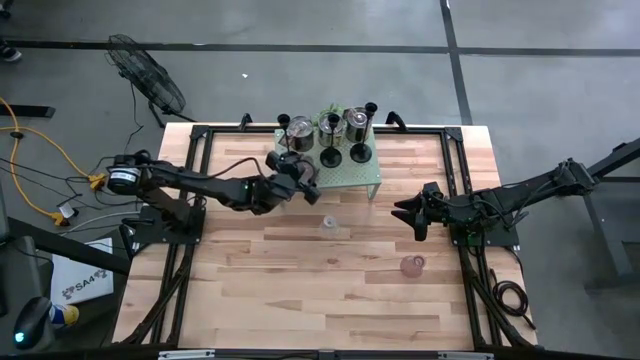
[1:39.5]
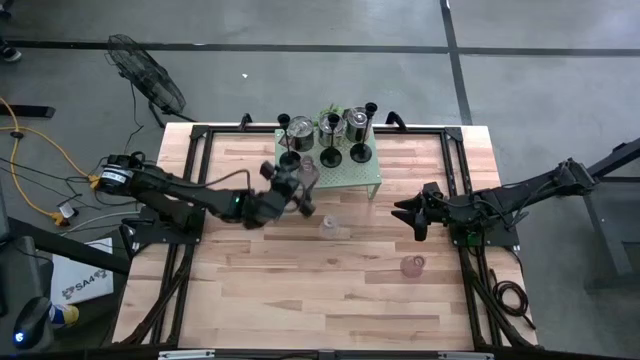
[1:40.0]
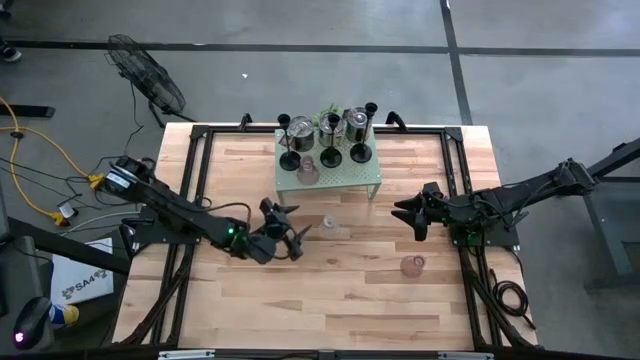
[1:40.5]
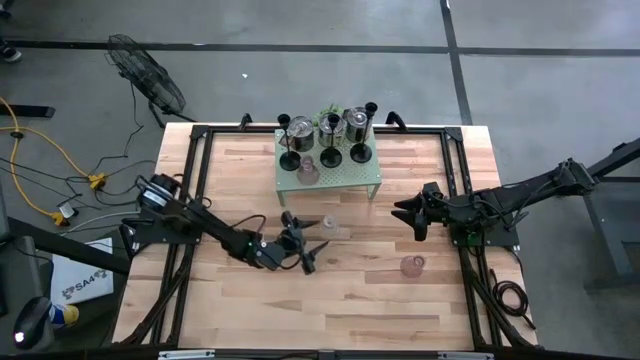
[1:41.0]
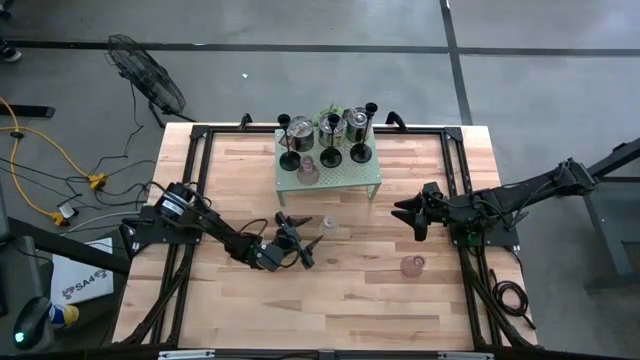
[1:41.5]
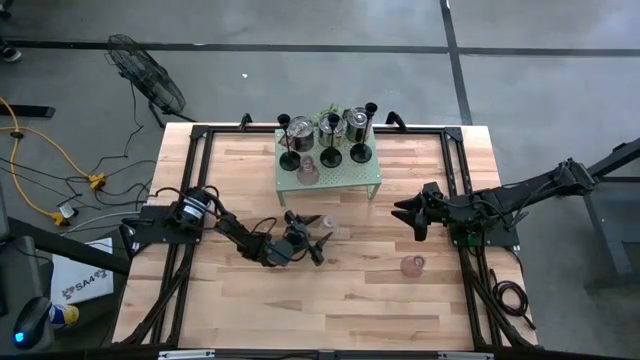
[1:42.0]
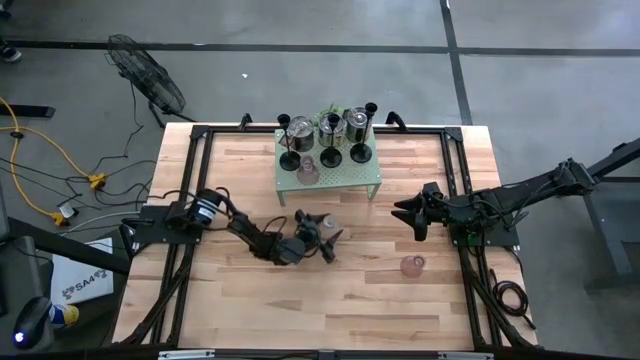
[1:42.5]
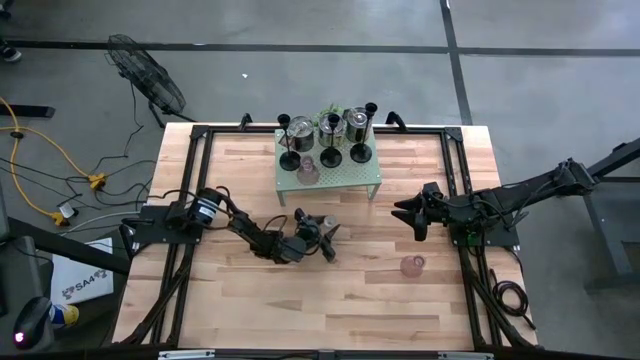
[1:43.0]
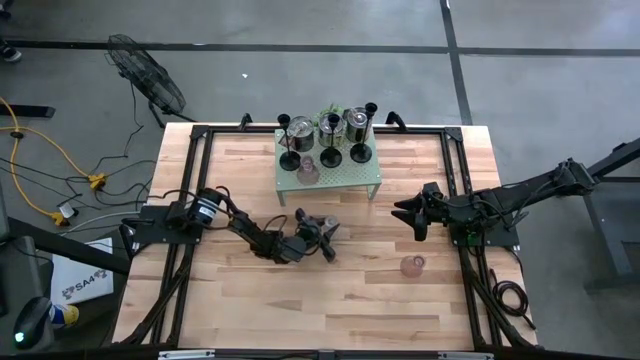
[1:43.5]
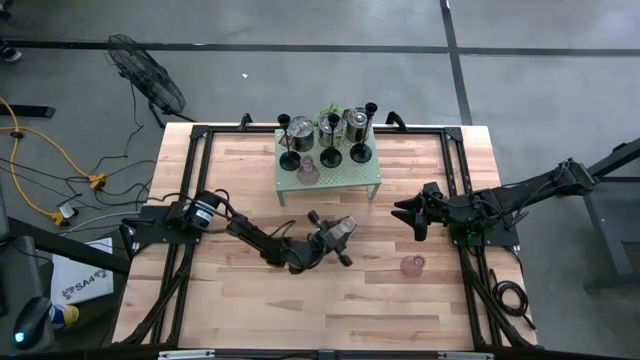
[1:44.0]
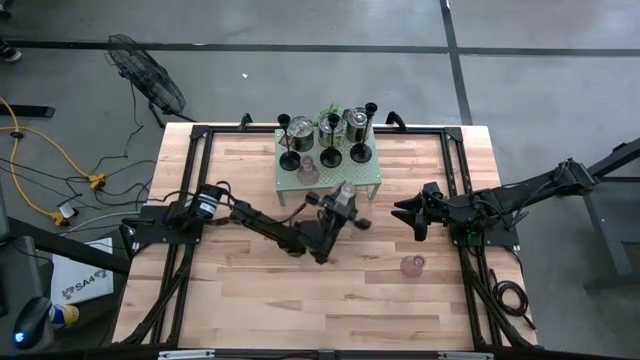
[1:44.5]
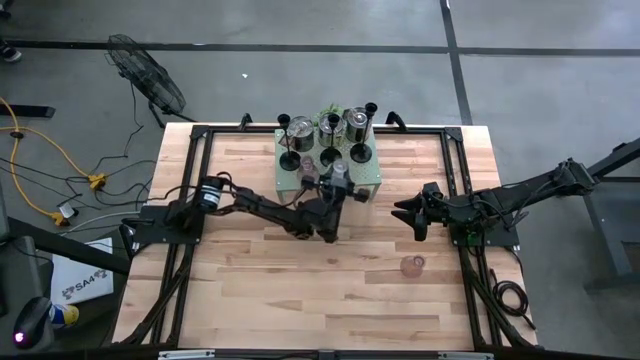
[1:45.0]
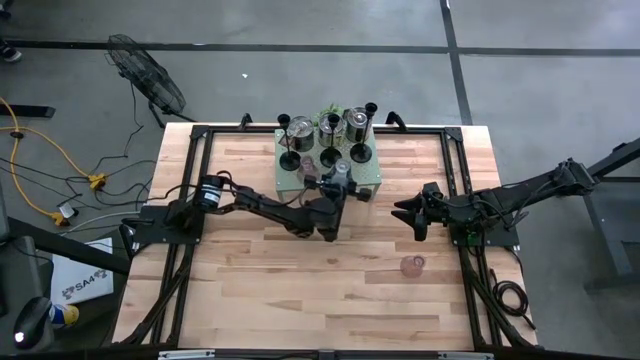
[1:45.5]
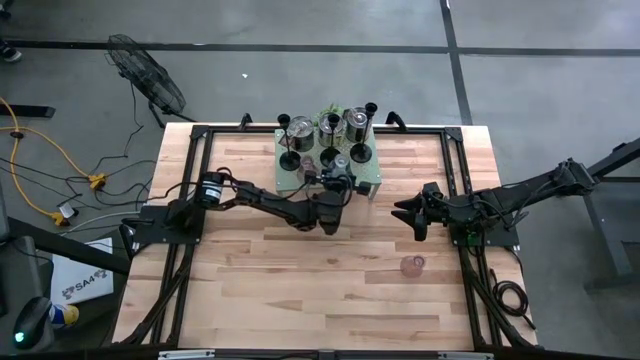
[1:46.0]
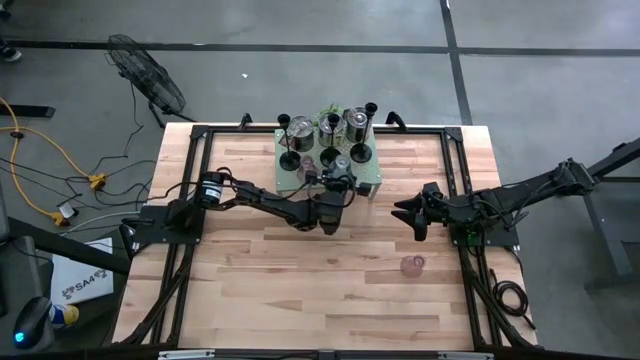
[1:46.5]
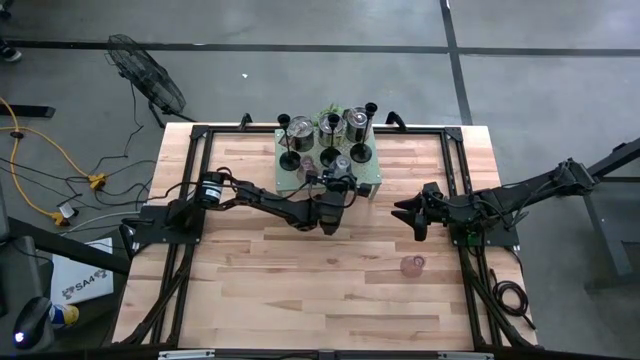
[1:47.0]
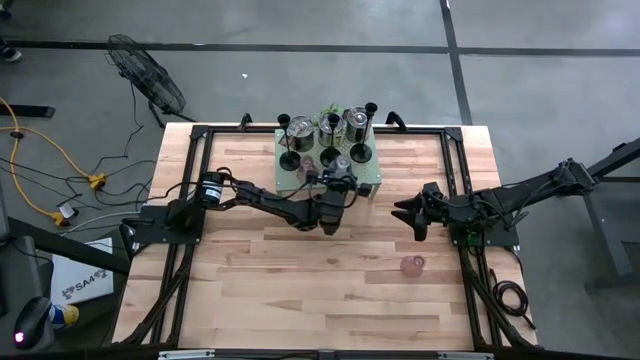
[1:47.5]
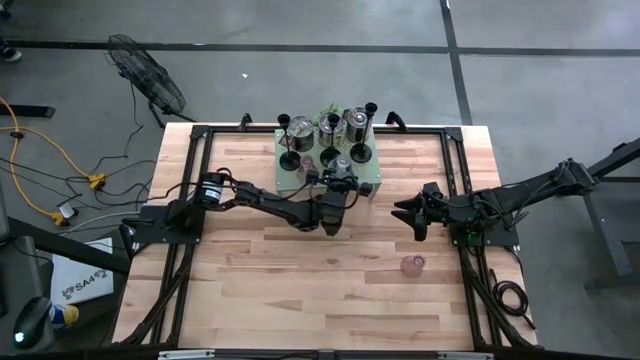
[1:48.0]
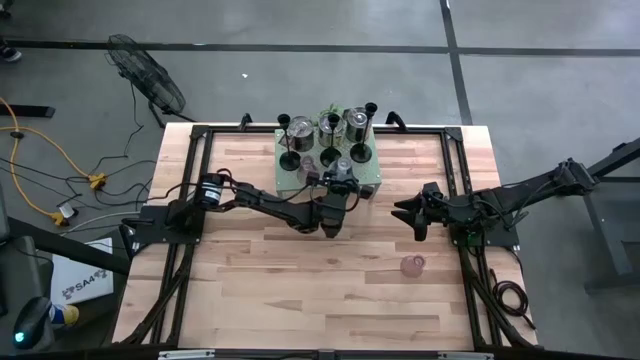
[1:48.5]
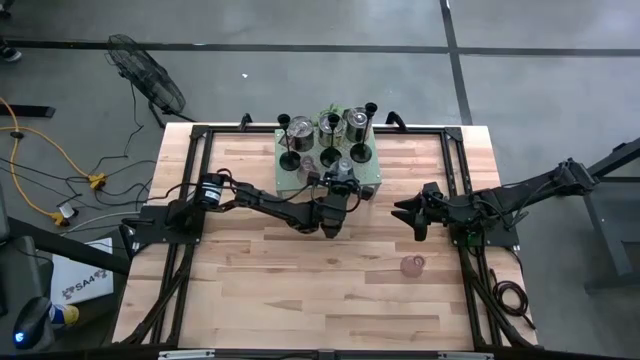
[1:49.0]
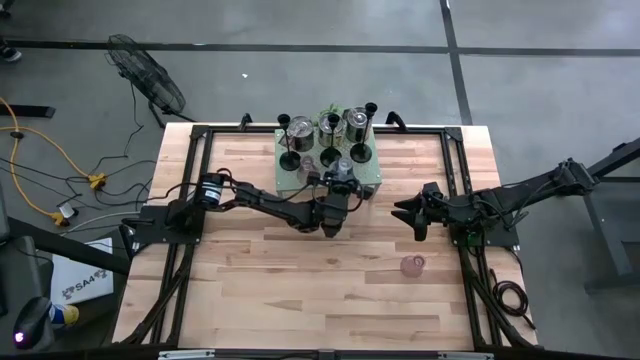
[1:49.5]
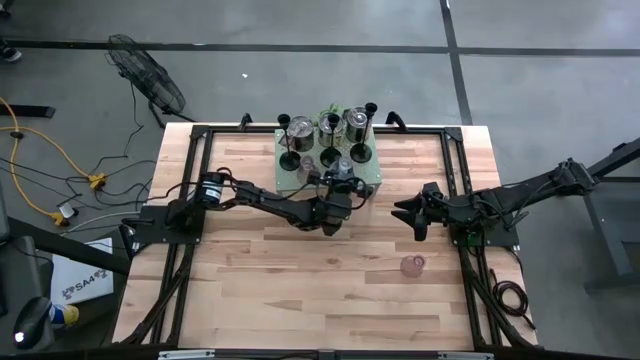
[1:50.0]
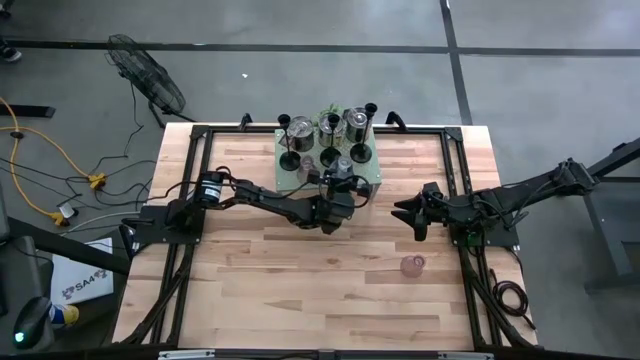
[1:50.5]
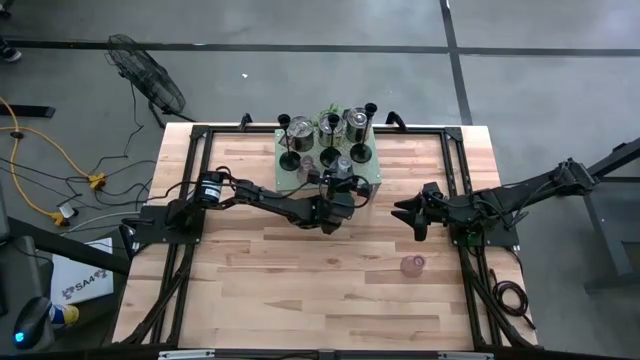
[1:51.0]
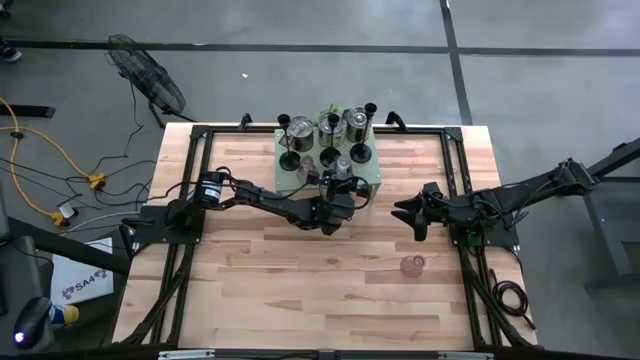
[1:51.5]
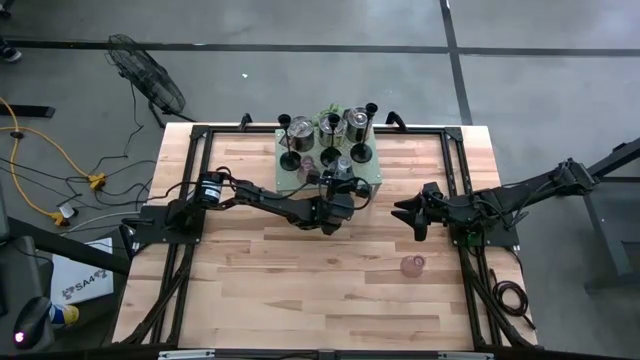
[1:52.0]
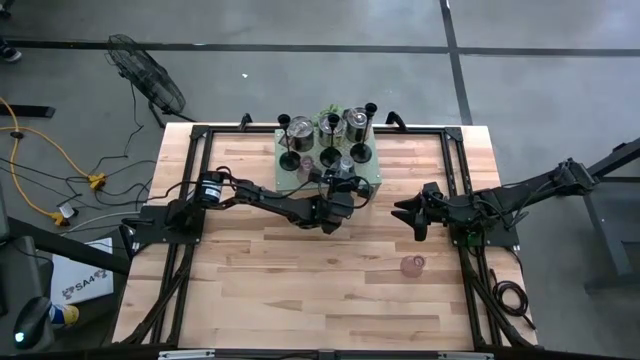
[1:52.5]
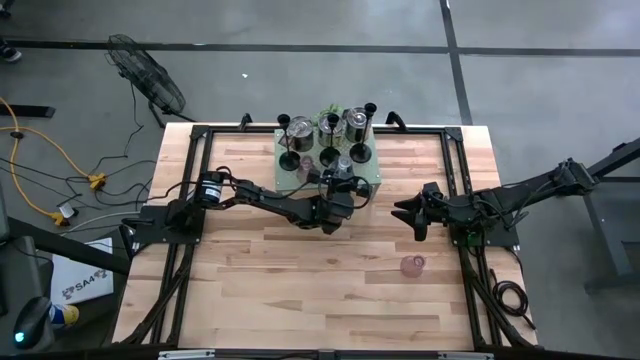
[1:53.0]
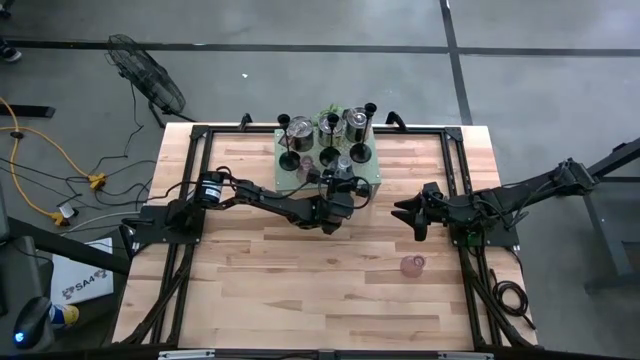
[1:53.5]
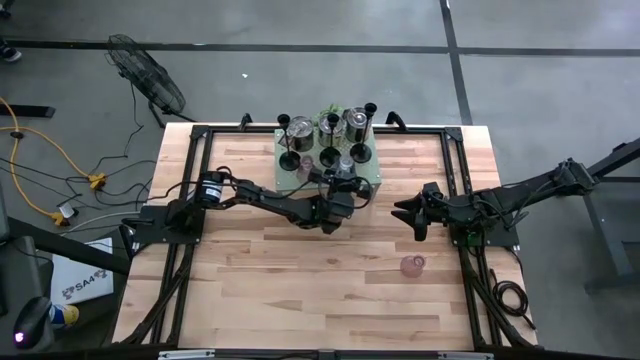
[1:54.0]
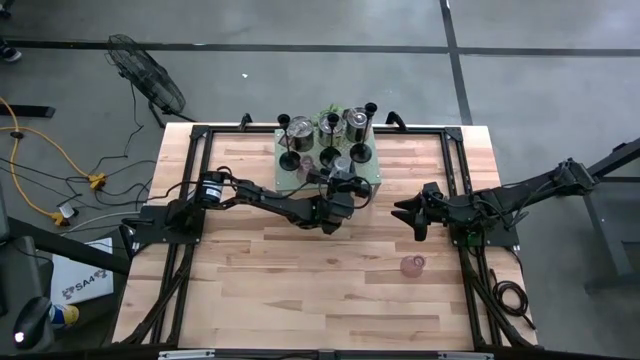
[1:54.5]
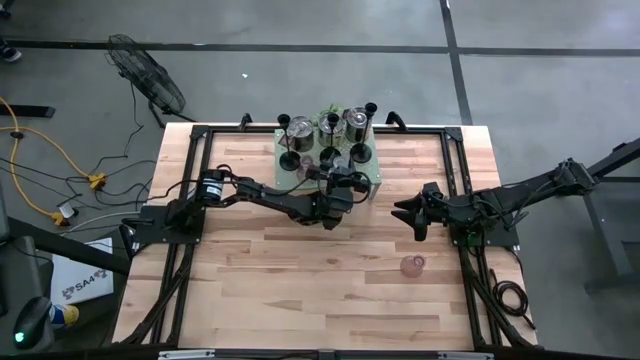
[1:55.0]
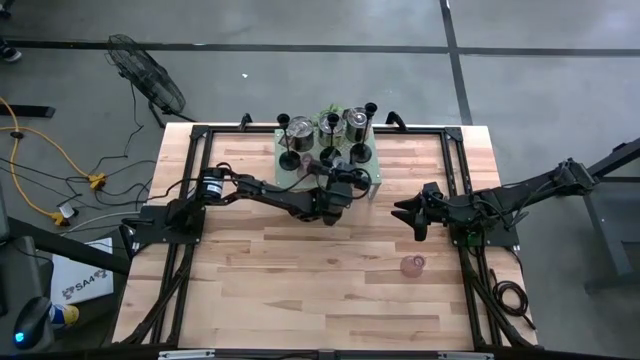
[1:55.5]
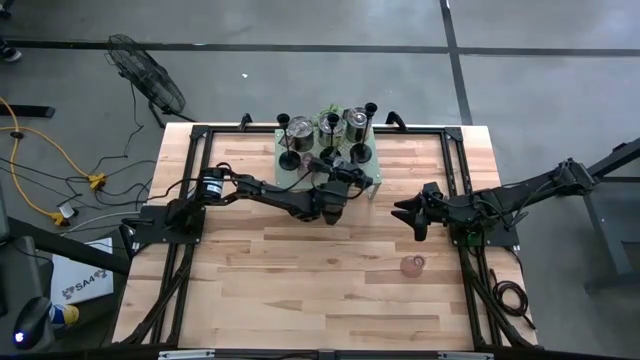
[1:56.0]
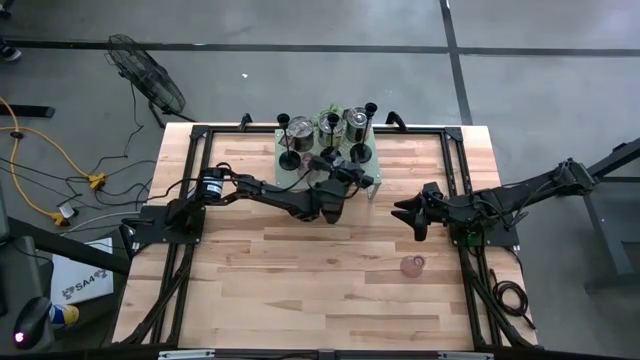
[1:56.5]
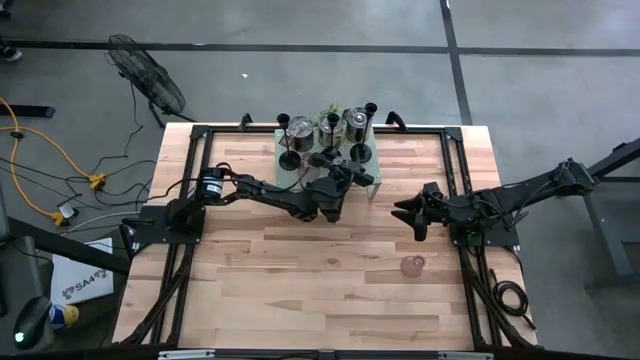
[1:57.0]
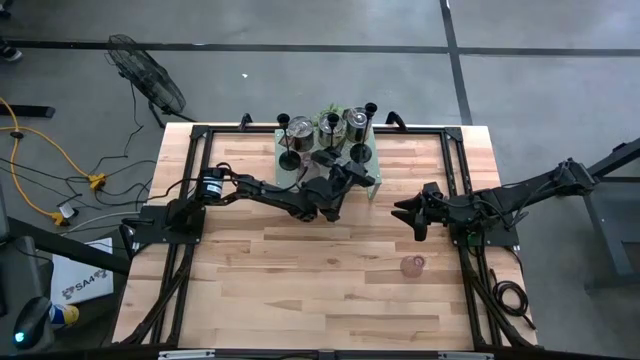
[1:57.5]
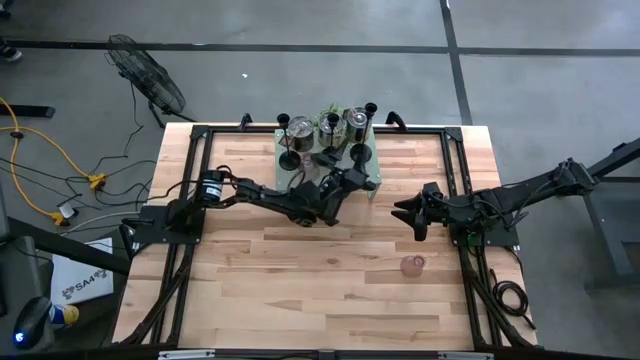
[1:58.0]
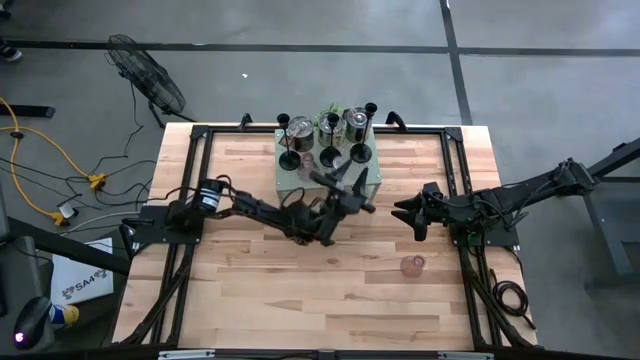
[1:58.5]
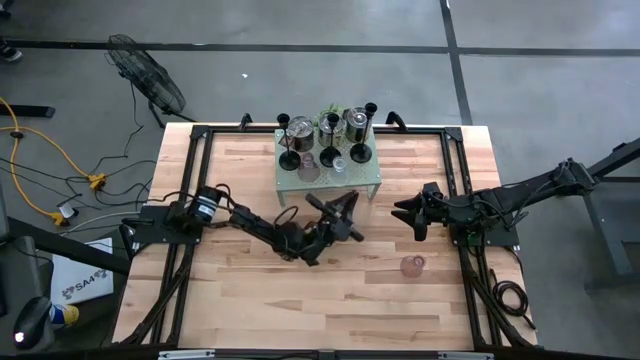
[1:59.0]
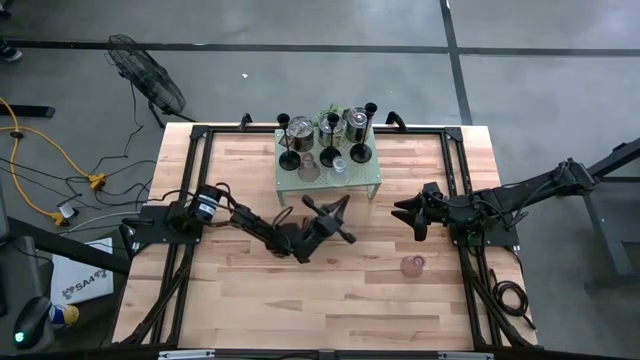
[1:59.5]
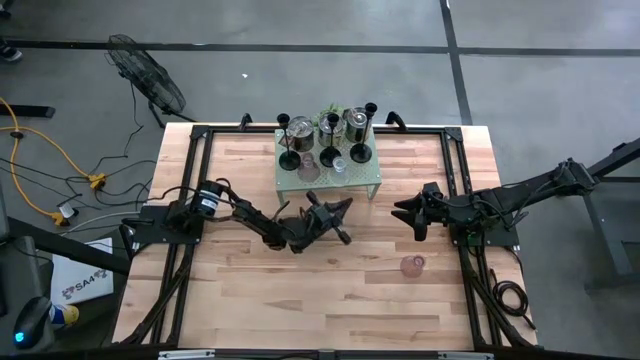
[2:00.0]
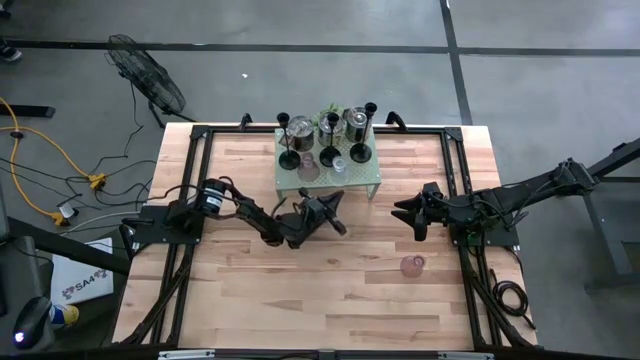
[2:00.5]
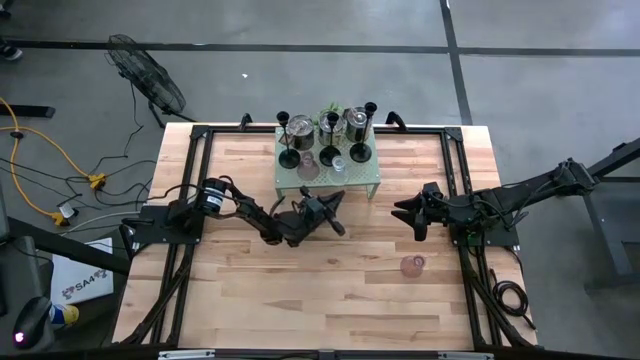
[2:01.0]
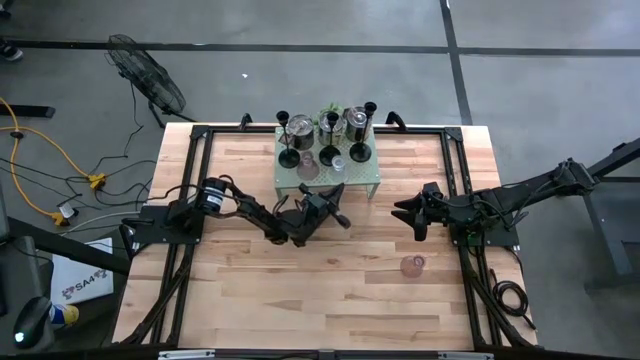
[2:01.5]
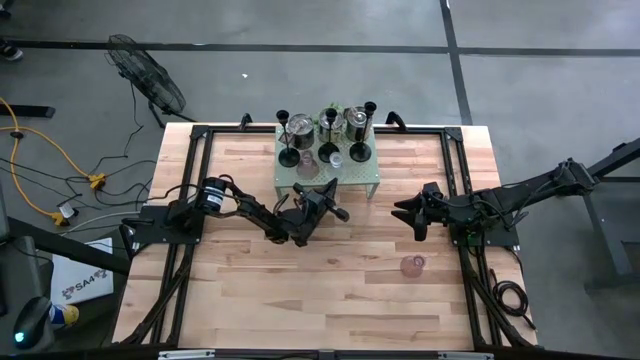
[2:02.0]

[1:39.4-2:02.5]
Task: Pick & Place candle stick holders
Put the transparent candle holder on the shelf
